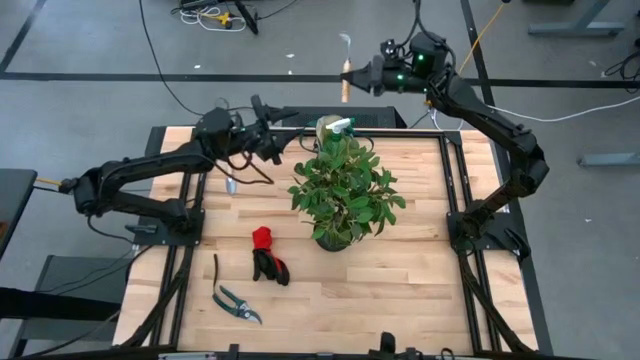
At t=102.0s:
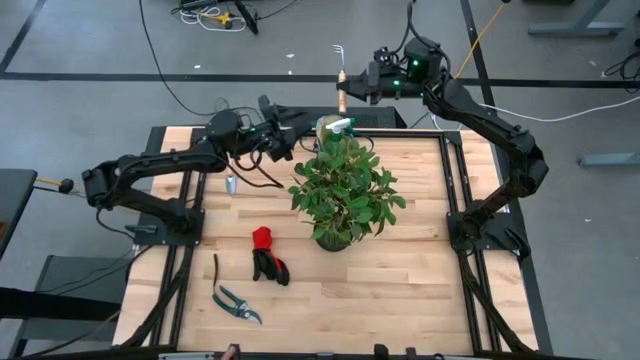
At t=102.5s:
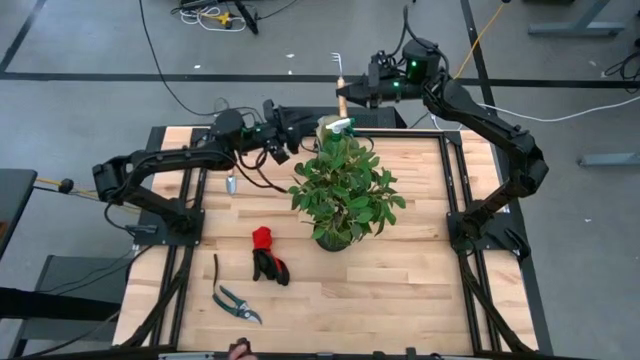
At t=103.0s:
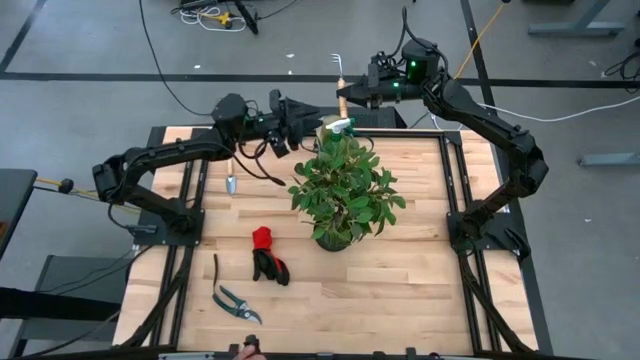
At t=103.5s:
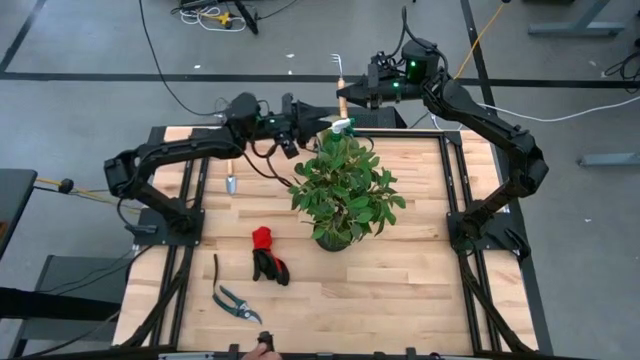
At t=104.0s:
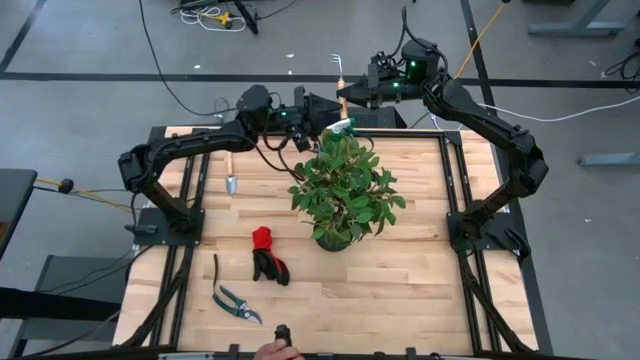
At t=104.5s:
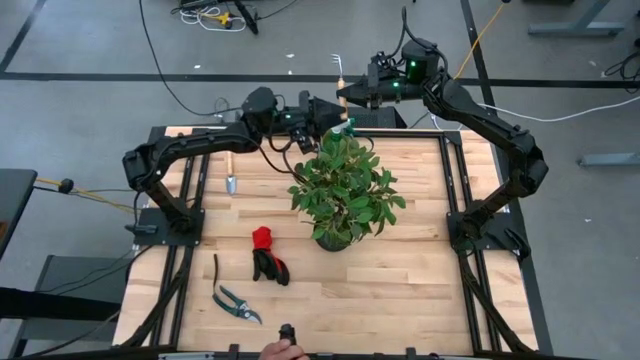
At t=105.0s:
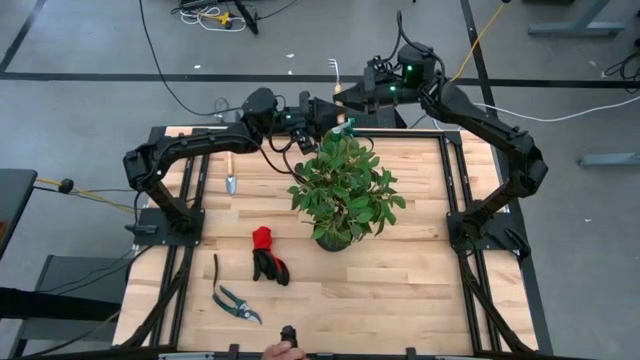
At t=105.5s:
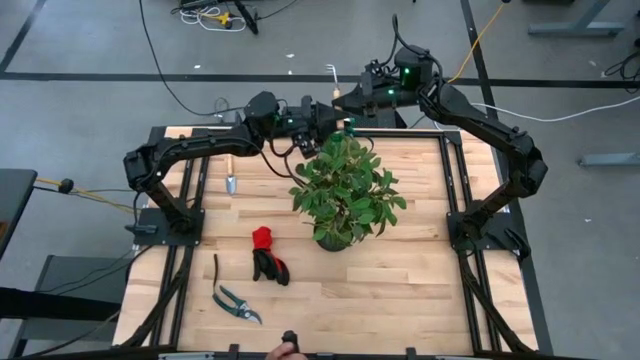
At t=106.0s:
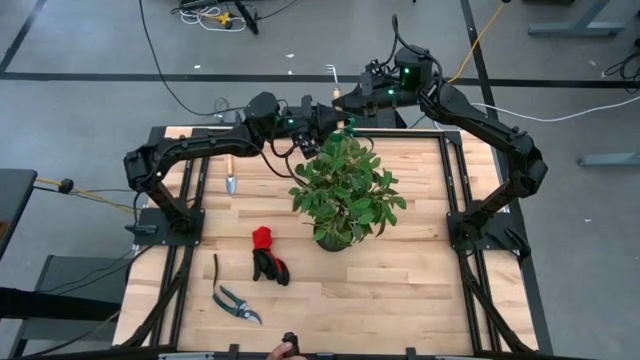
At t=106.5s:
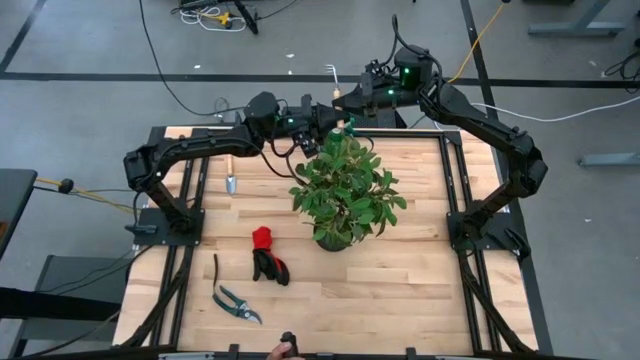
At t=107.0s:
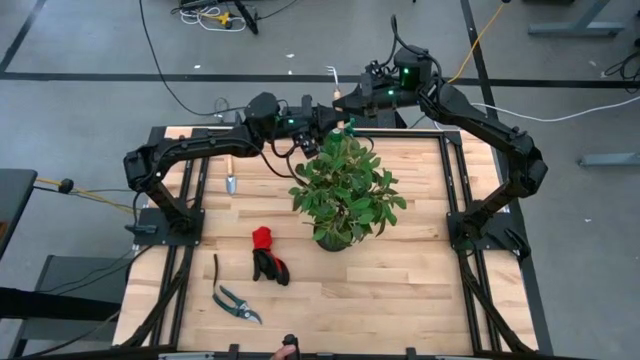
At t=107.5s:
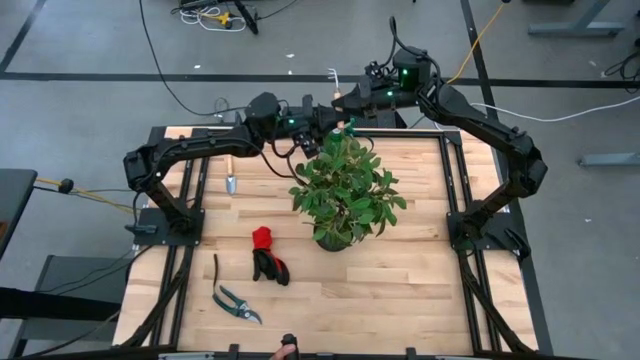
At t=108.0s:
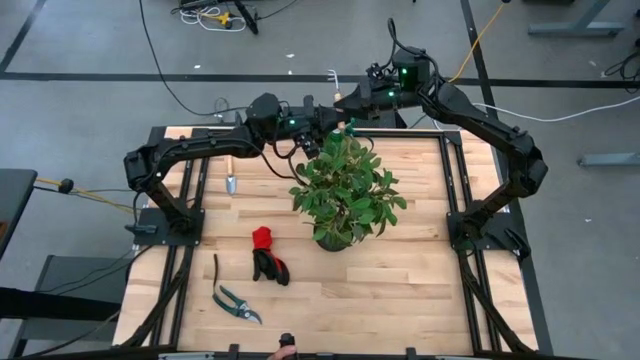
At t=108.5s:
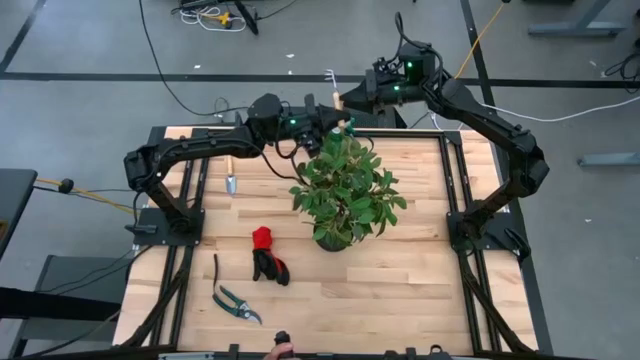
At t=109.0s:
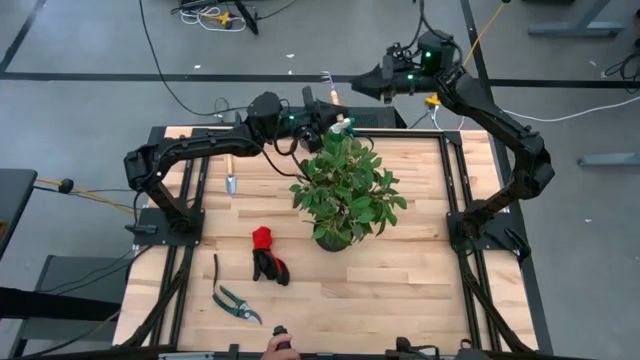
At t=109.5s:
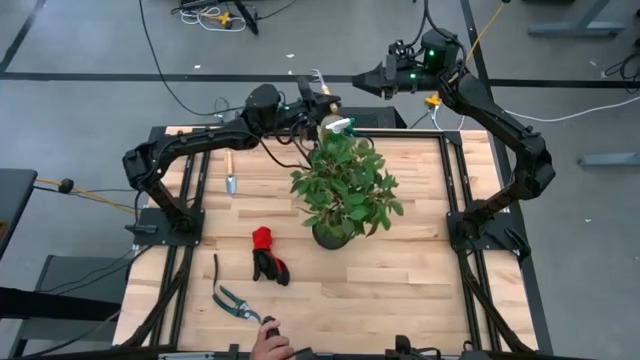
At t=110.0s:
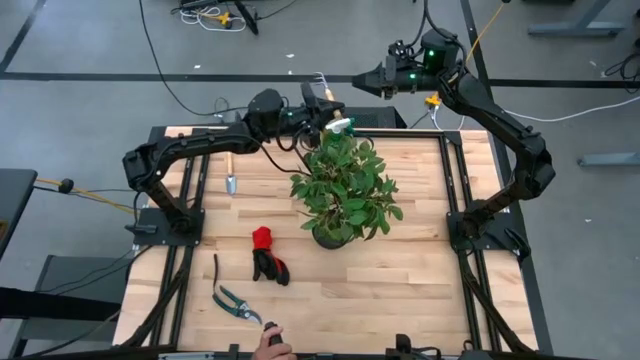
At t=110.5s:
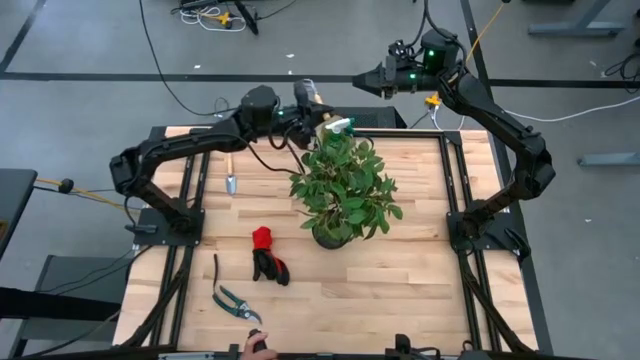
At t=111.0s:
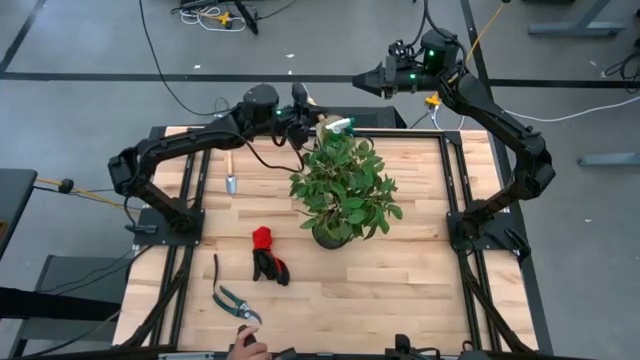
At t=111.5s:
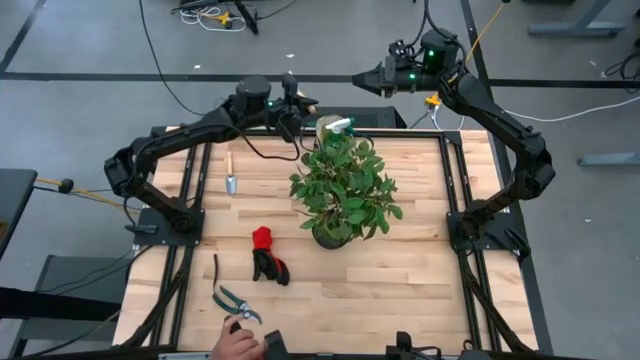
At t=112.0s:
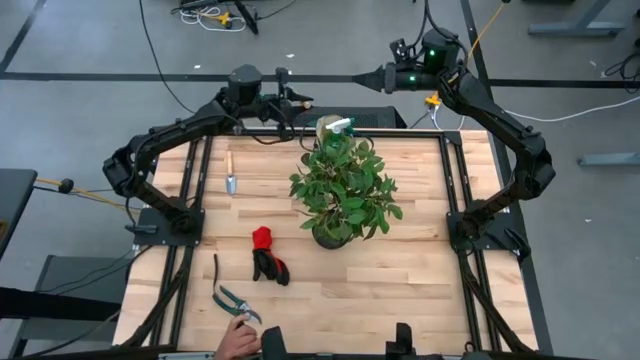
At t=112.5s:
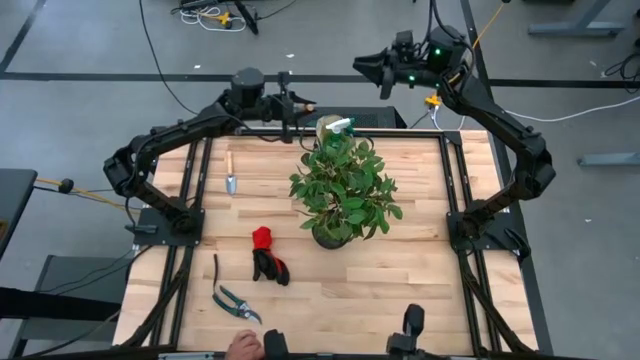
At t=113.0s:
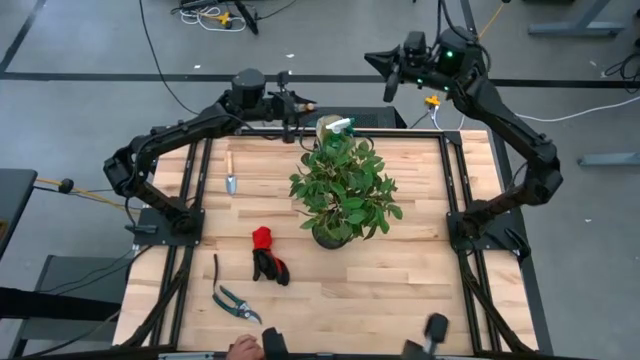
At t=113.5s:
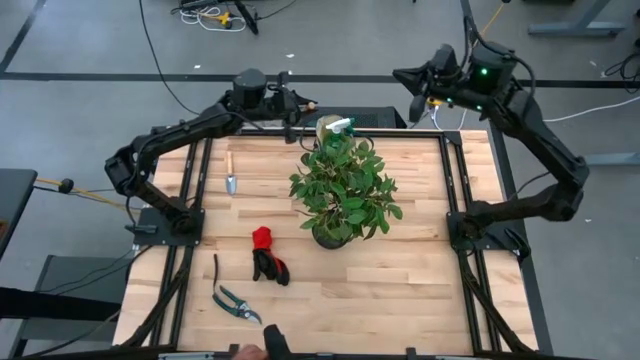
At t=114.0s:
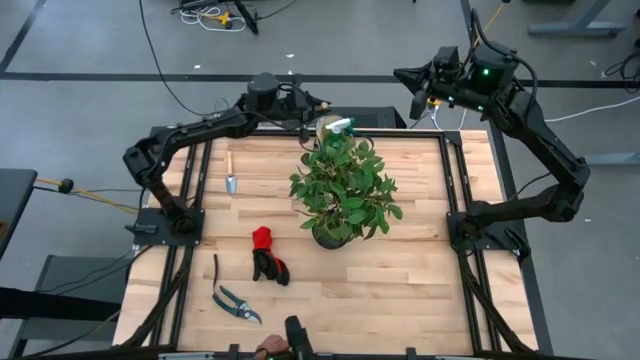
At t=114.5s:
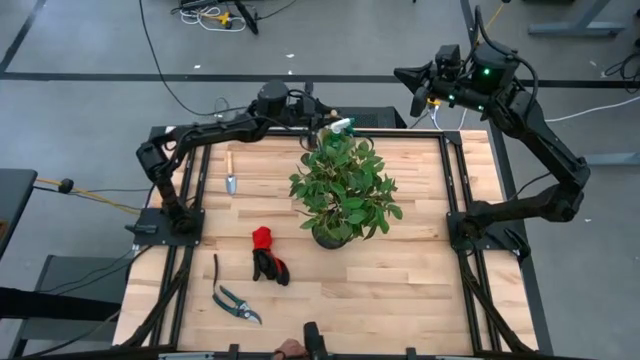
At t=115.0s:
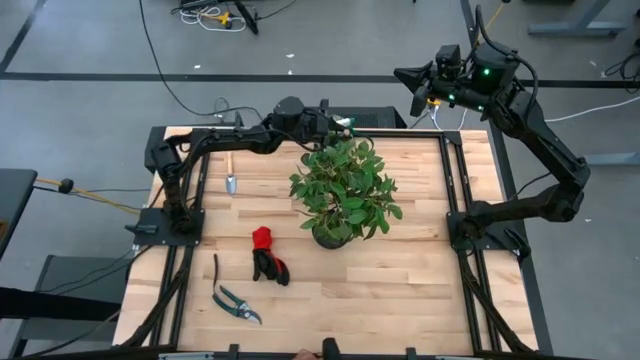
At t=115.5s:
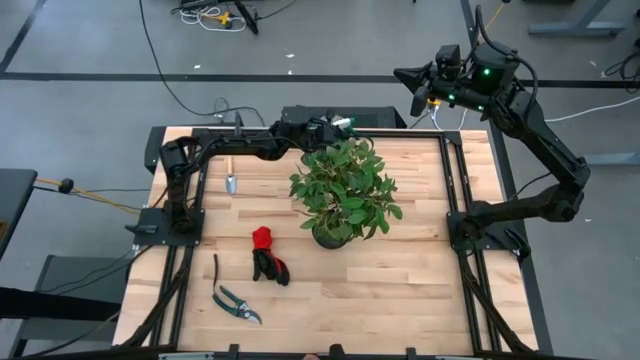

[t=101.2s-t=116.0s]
Task: Pick & Place Garden tools in Gardening bag
Put the brown hand rake into the gardening bag

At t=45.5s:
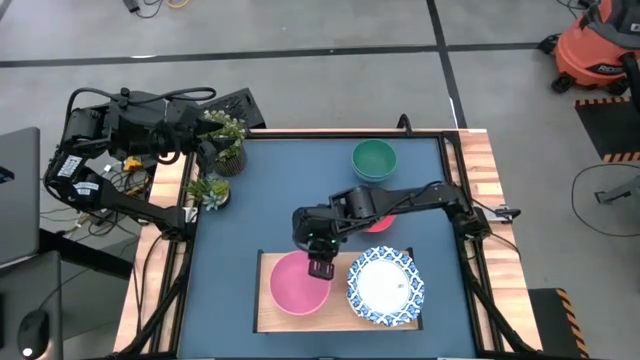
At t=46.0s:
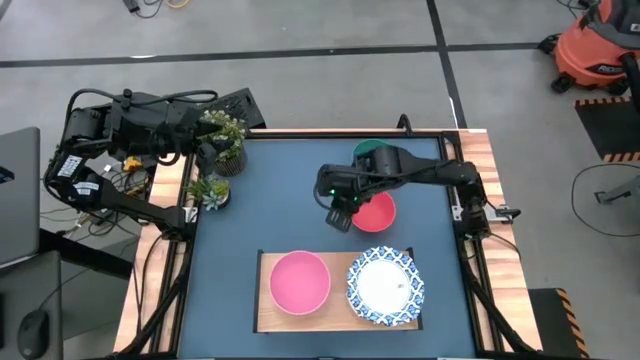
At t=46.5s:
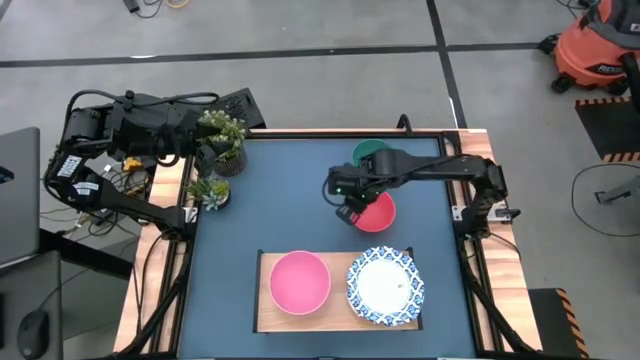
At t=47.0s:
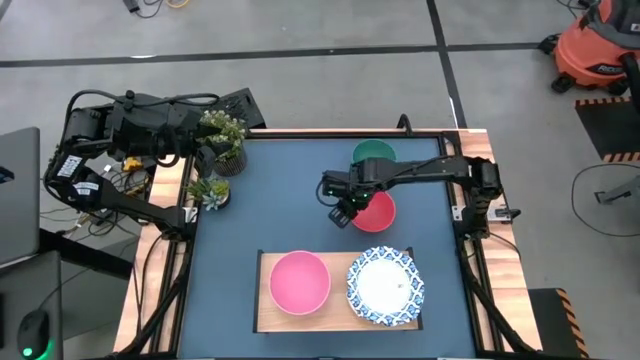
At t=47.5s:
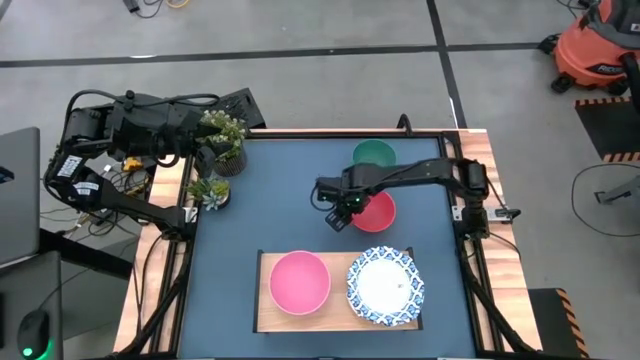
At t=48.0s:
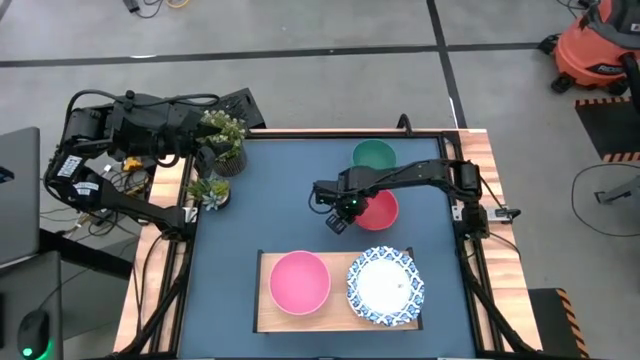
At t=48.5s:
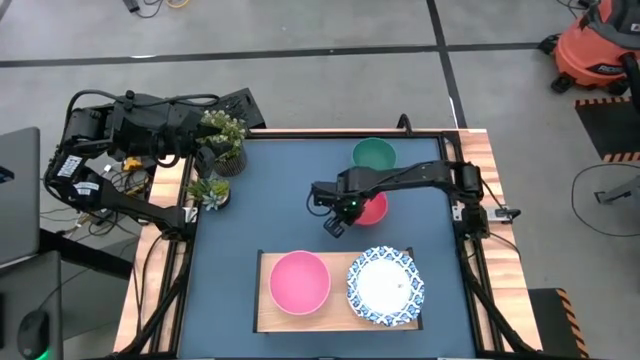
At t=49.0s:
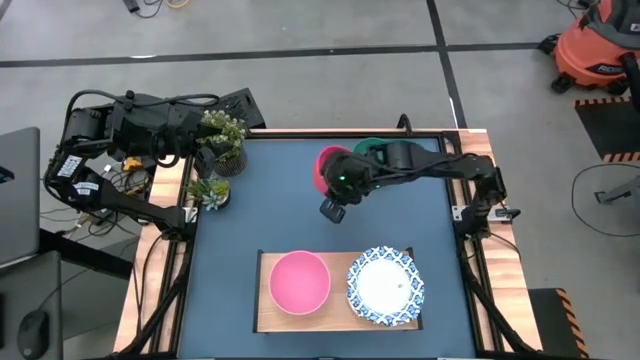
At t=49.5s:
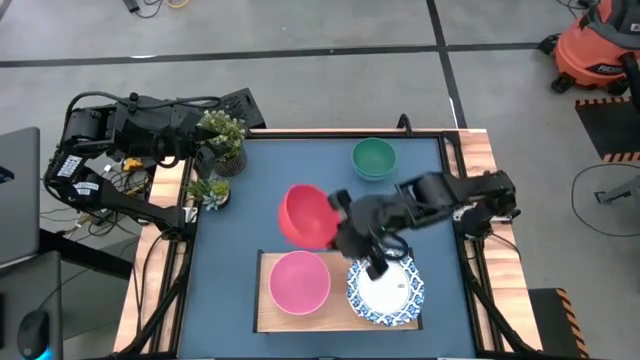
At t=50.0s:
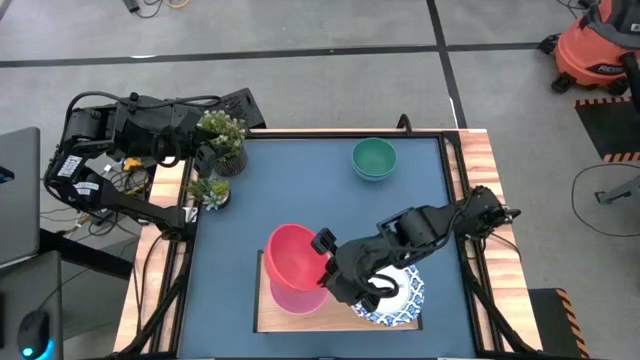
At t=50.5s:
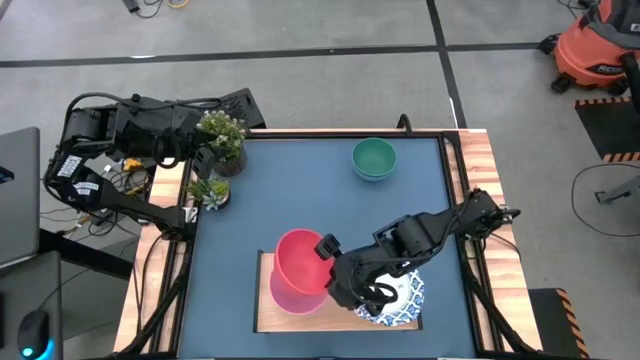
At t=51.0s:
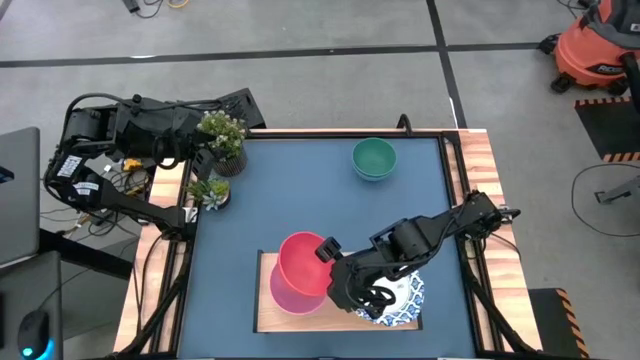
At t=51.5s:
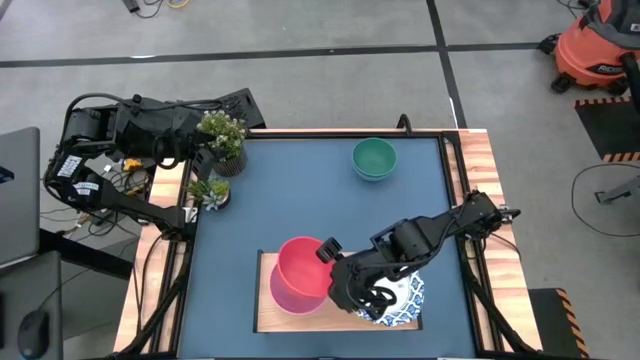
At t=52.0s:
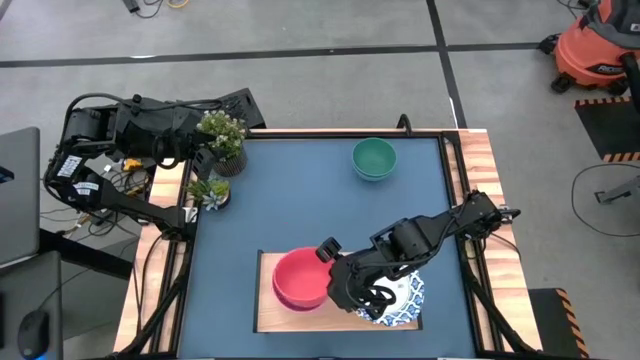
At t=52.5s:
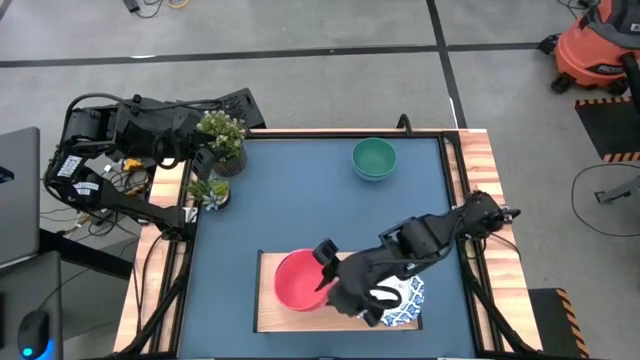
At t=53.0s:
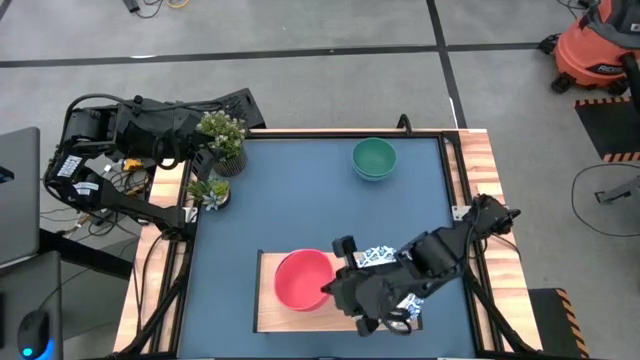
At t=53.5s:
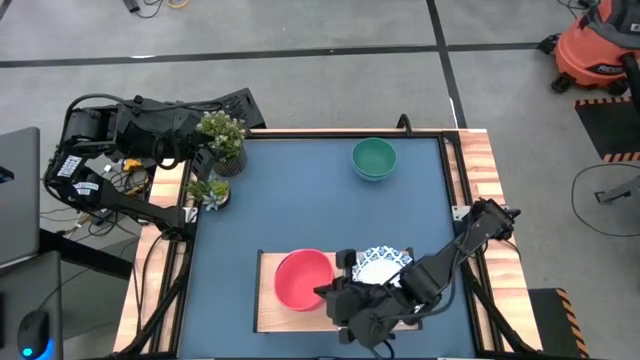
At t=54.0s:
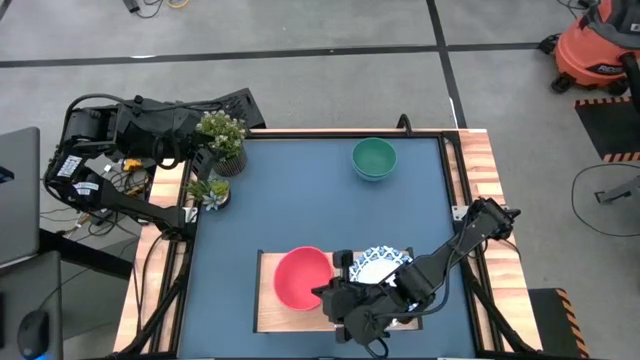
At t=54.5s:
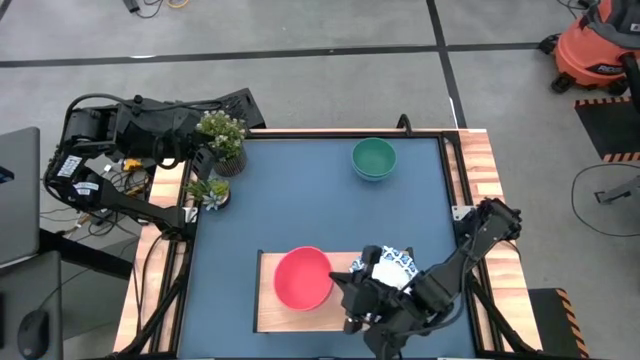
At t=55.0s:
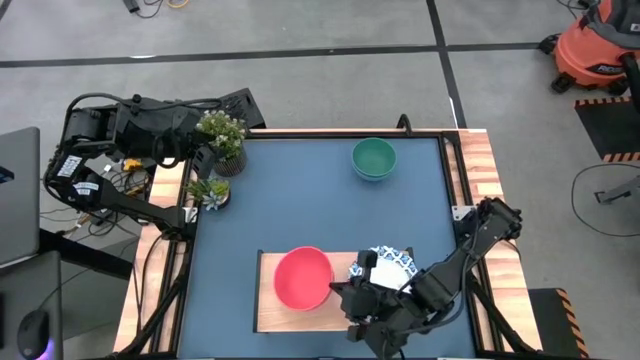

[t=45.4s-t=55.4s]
Task: Place and stack bowls onto a shelf
Stack the orange bowl on top of the pink bowl on the shelf
